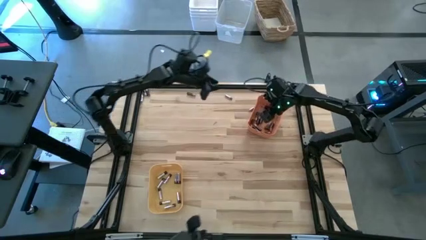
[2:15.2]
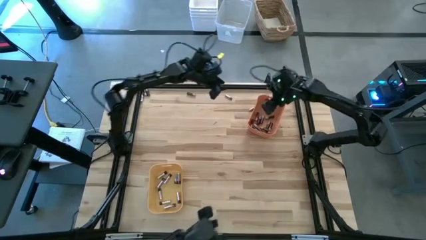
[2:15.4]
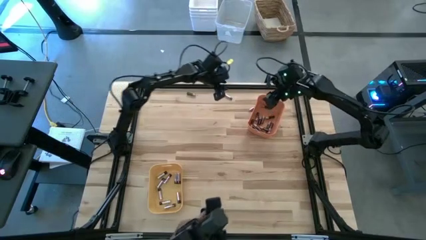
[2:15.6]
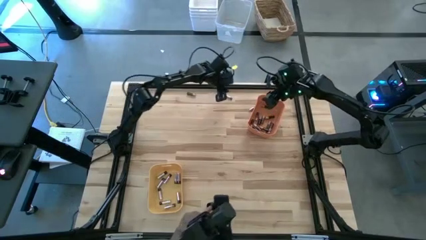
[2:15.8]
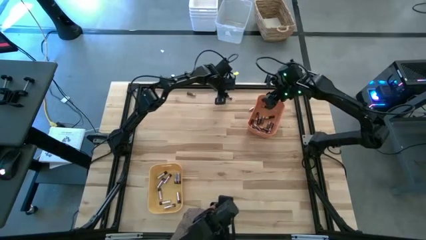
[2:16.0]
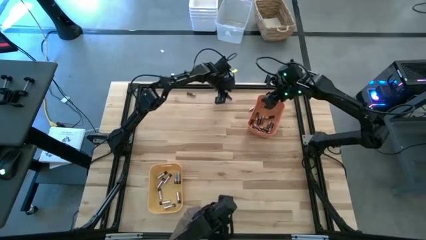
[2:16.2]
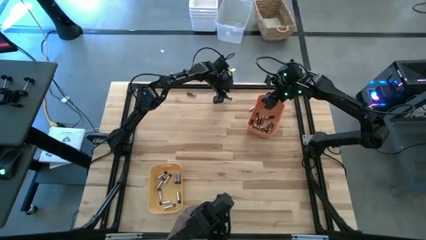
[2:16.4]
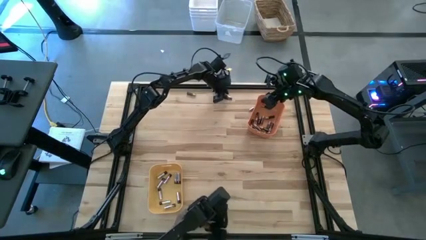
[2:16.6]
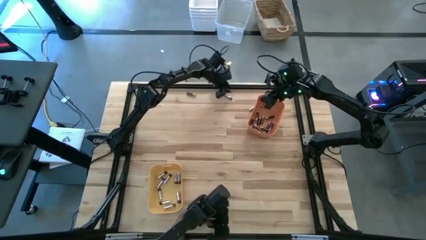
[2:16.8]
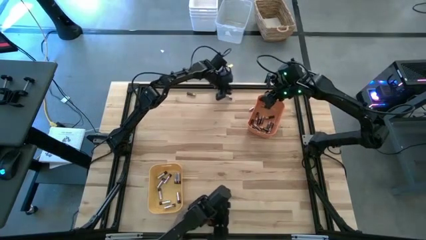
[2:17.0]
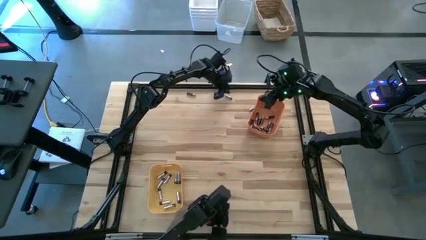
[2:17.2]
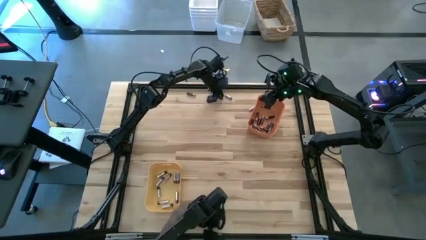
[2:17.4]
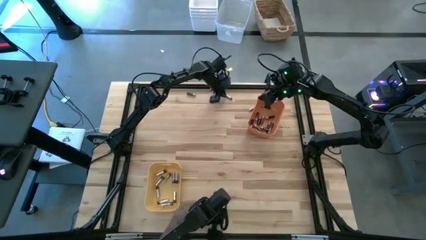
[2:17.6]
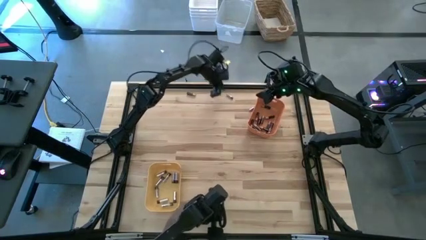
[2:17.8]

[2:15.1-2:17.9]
Task: Sort batteries
Put the silver battery into the yellow bin

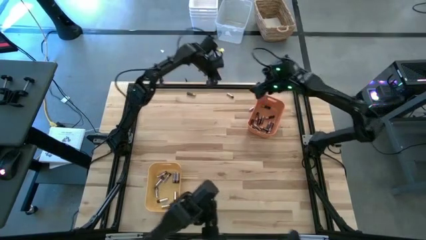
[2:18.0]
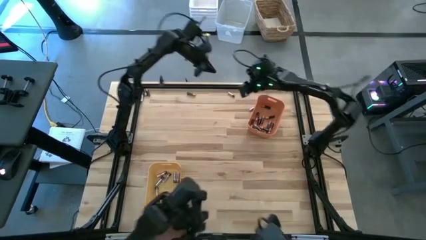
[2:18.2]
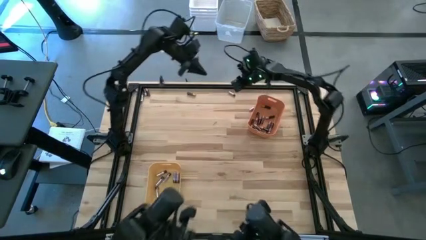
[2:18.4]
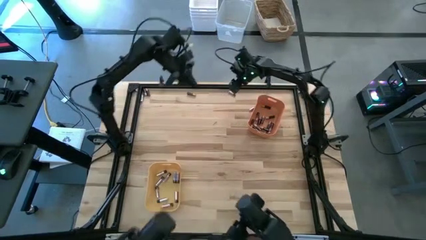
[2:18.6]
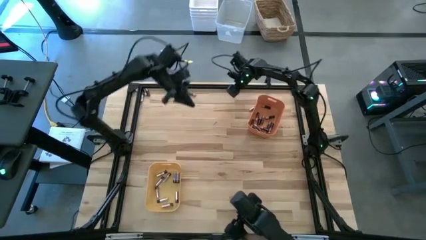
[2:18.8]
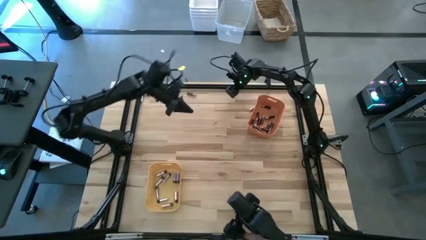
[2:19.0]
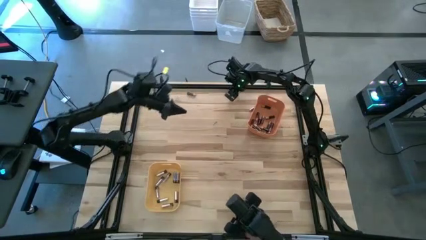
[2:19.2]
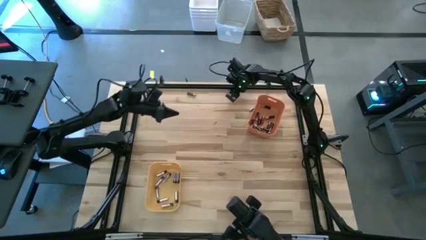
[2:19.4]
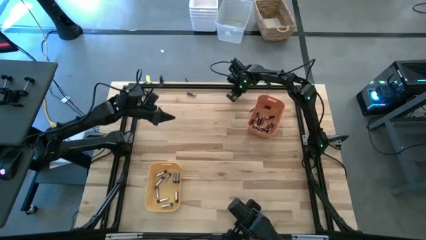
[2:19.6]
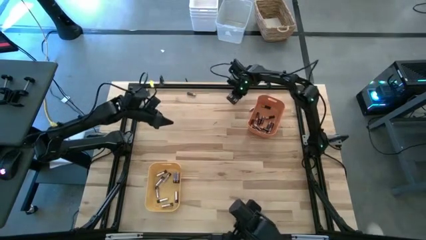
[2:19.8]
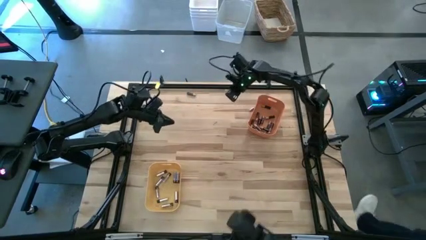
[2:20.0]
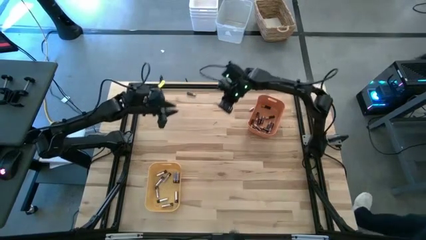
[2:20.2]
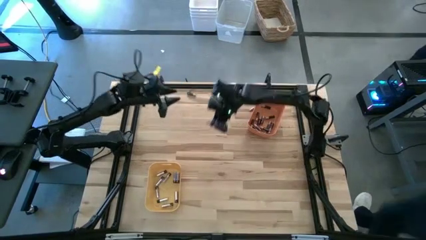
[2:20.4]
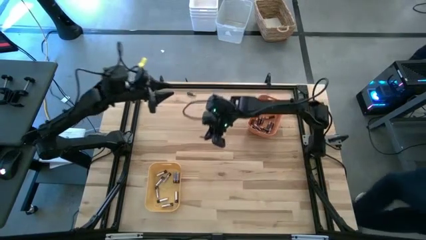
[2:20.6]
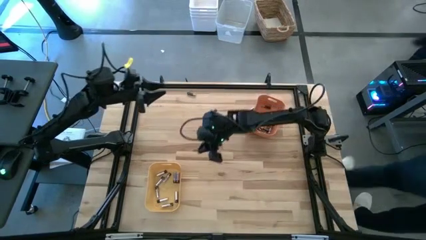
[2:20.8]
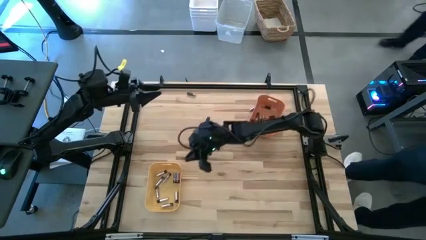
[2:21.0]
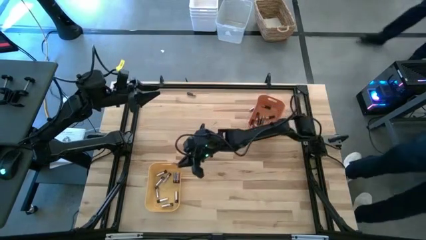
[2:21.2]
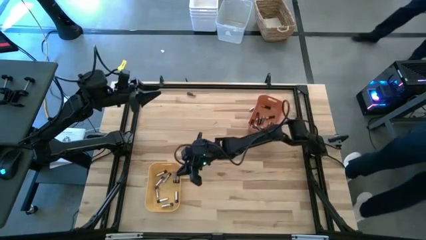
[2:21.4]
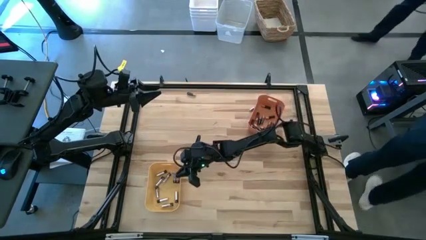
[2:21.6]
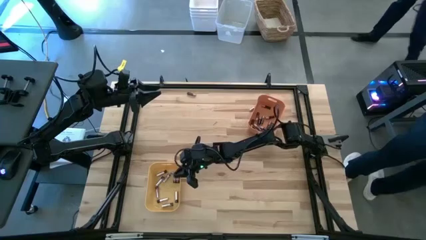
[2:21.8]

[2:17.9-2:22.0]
Put the silver battery into the yellow bin

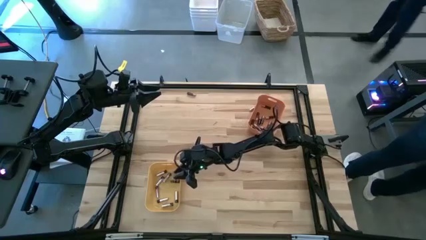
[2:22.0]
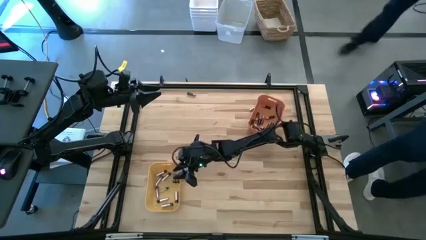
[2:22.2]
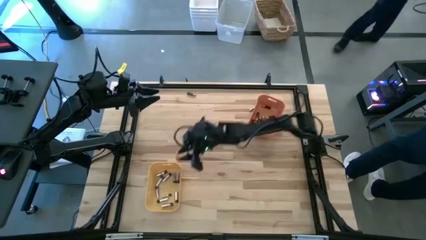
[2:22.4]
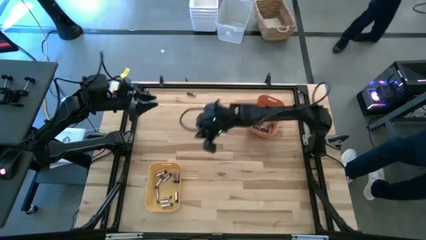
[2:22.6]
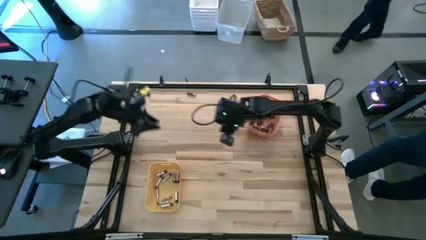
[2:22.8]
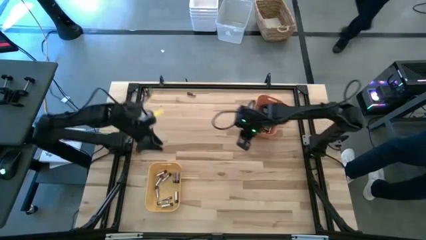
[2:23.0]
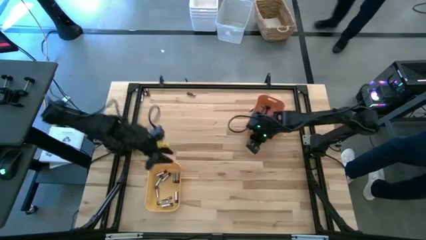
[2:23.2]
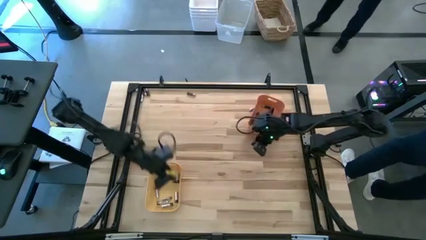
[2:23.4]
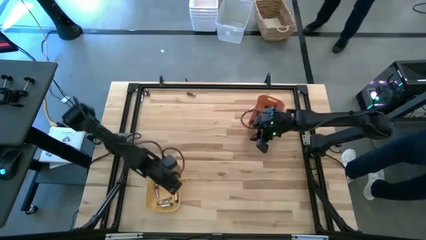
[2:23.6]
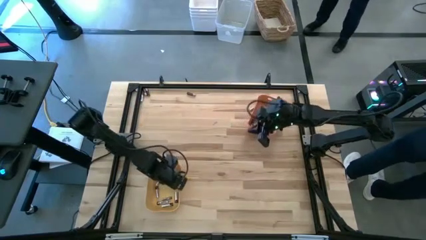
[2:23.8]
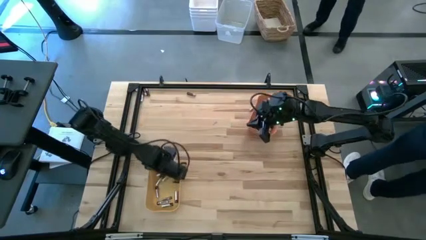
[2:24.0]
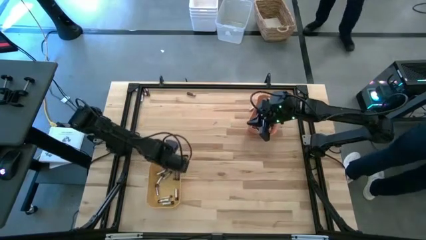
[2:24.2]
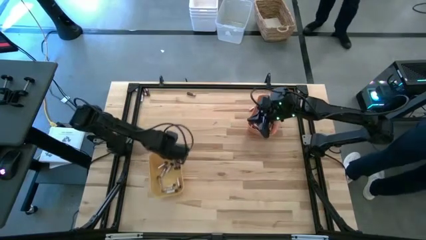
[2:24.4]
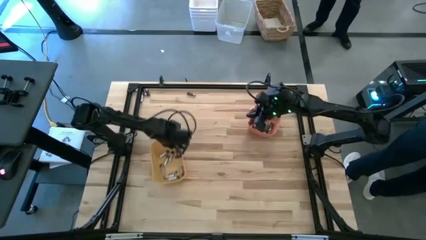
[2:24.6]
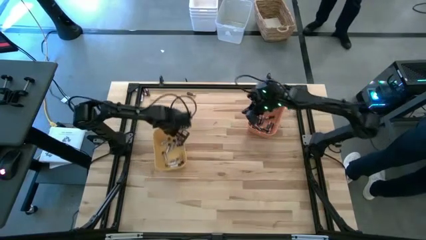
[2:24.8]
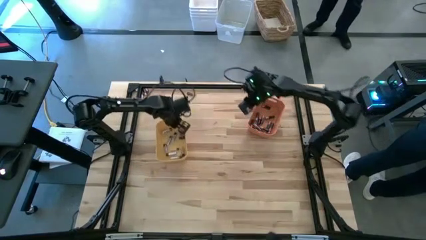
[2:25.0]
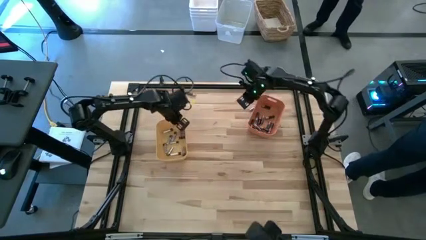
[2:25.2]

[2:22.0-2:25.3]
Move the yellow bin to the middle left of the table

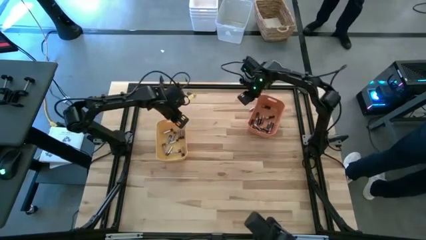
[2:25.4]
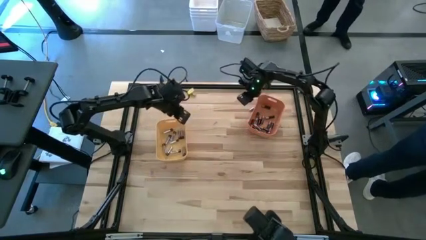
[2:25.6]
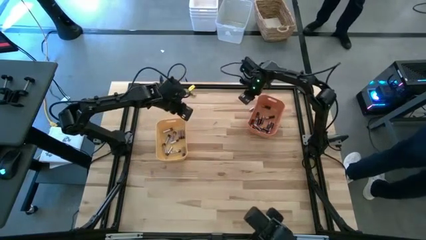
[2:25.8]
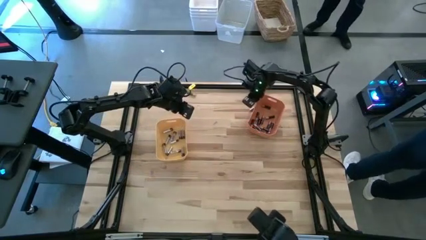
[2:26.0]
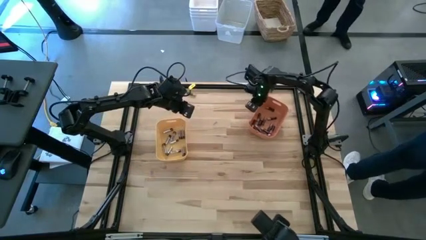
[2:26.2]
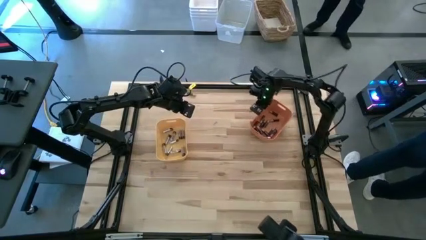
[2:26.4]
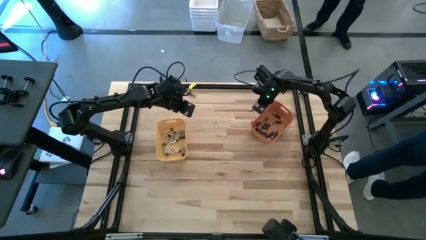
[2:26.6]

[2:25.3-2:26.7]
Adjust the orange bin

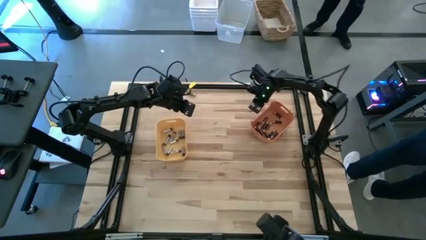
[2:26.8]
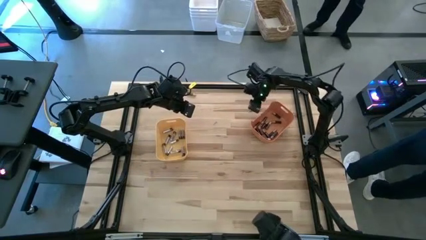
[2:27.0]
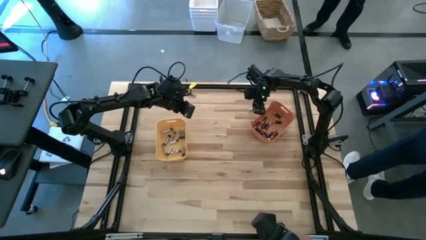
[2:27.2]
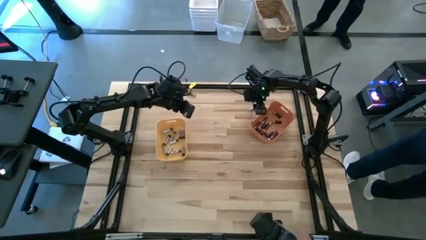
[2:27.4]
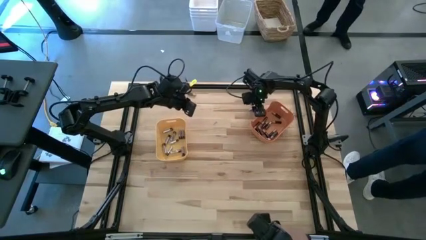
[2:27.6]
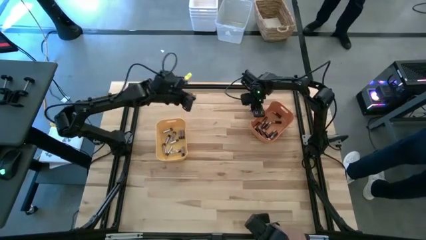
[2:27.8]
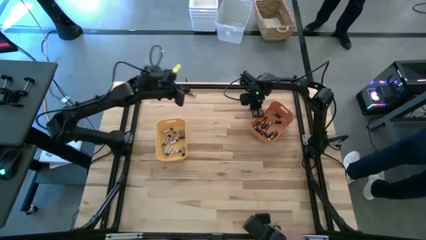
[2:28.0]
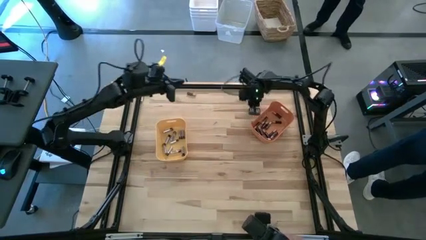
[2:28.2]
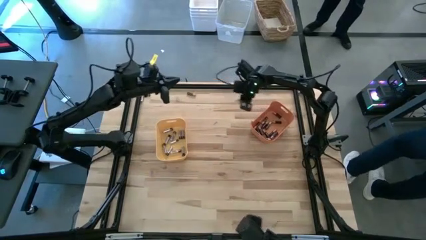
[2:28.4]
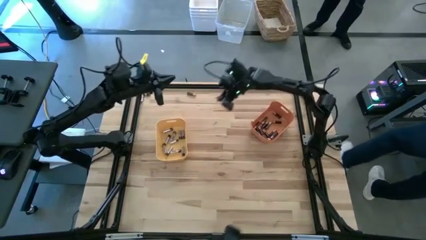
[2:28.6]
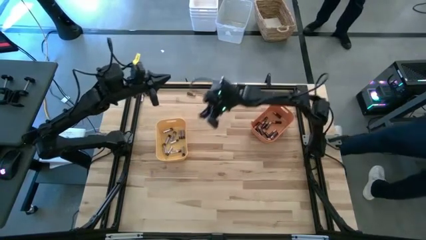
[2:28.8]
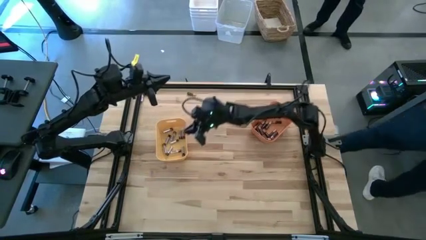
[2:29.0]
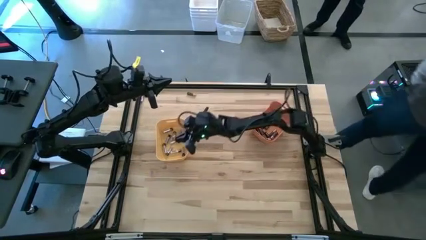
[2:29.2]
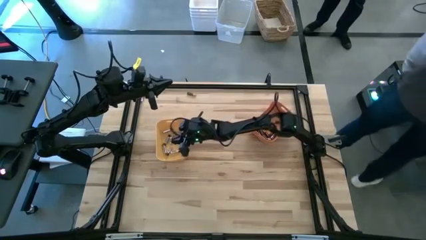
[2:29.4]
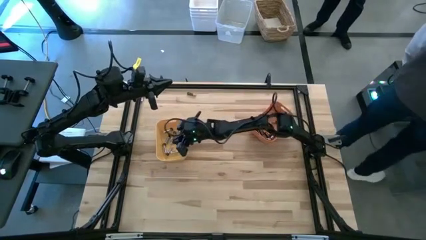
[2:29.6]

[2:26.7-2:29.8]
Put the silver battery into the yellow bin
